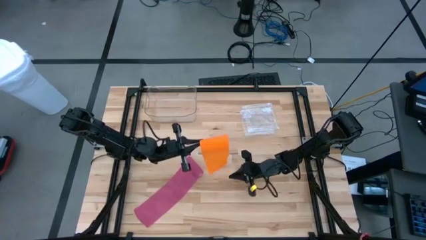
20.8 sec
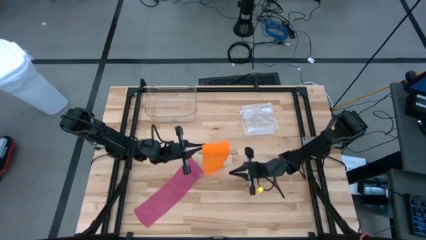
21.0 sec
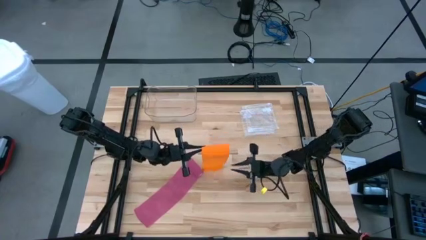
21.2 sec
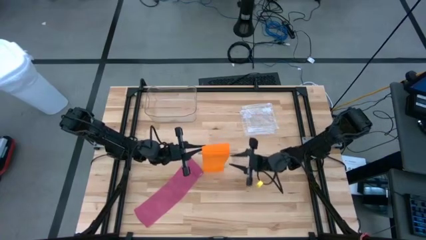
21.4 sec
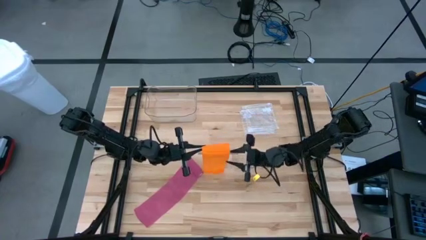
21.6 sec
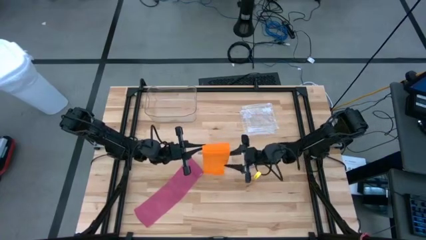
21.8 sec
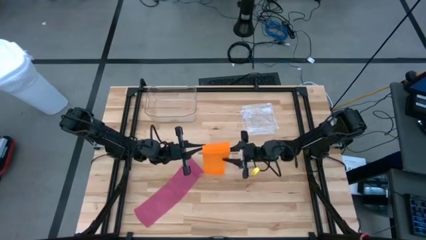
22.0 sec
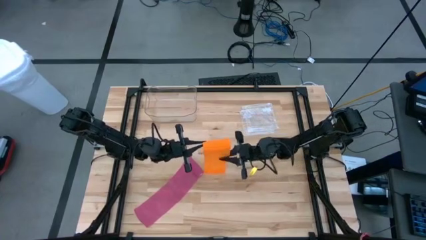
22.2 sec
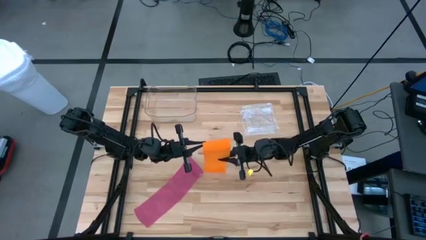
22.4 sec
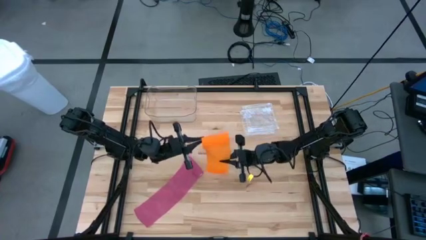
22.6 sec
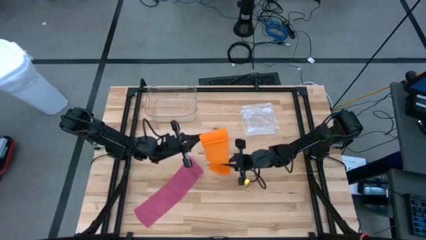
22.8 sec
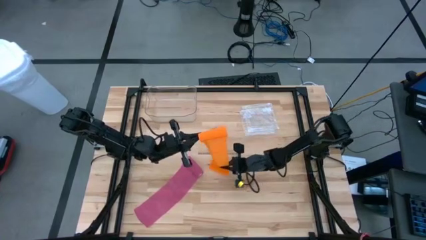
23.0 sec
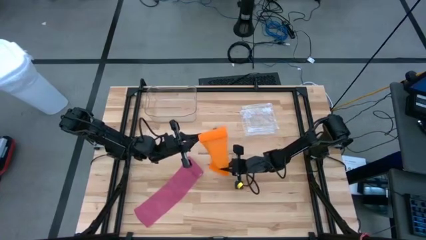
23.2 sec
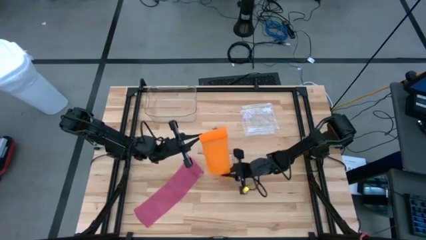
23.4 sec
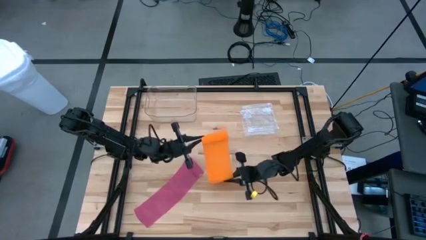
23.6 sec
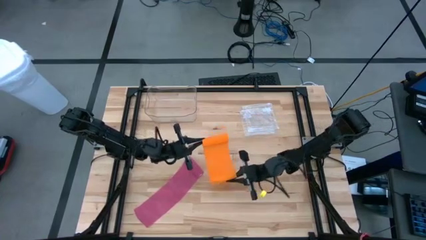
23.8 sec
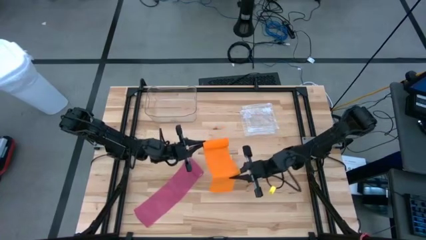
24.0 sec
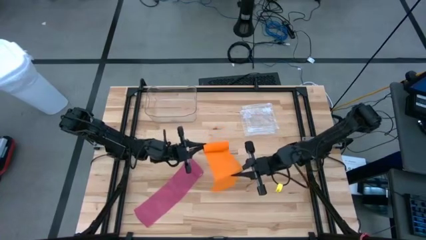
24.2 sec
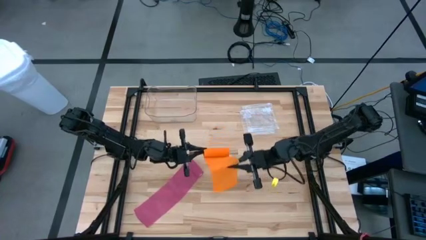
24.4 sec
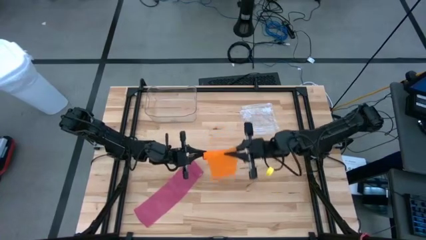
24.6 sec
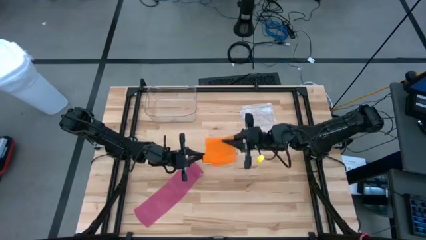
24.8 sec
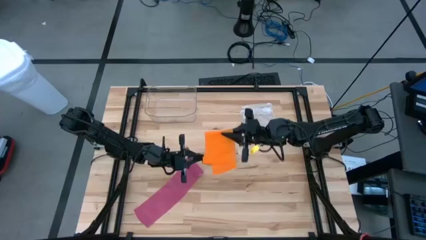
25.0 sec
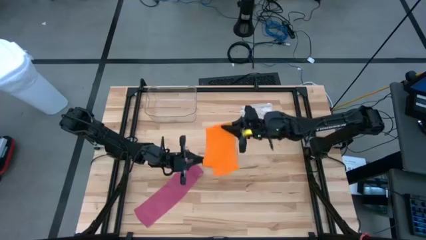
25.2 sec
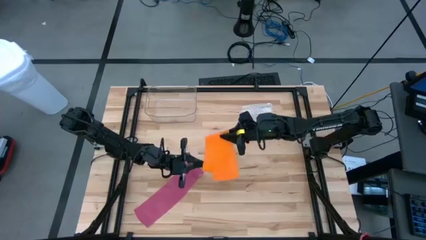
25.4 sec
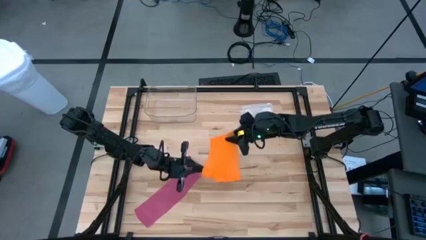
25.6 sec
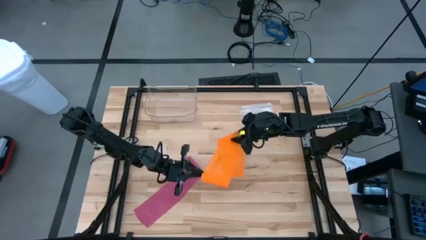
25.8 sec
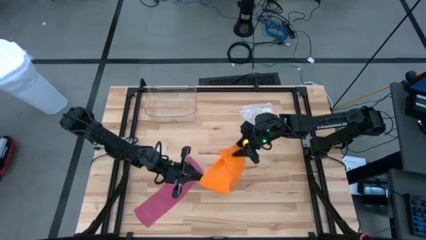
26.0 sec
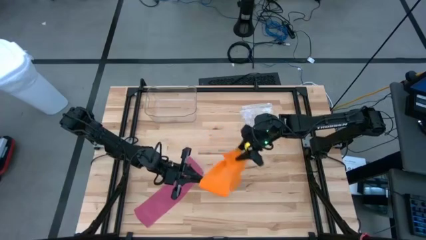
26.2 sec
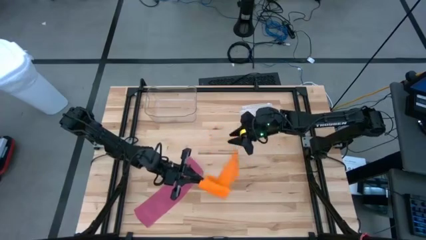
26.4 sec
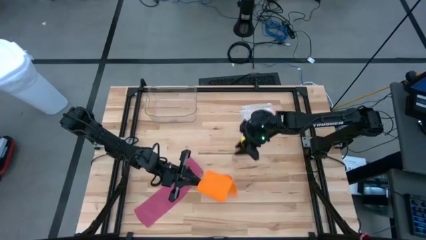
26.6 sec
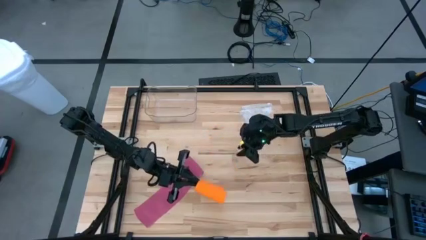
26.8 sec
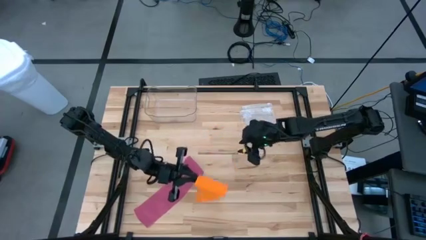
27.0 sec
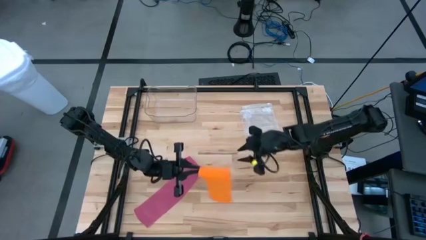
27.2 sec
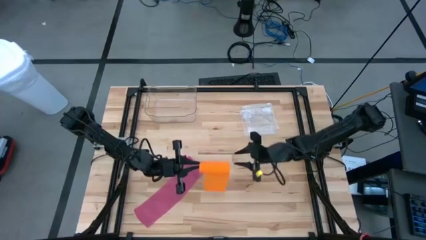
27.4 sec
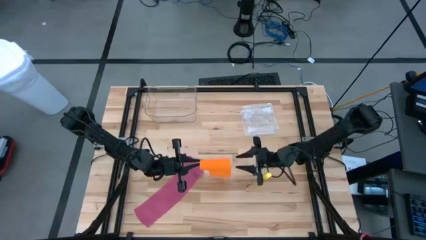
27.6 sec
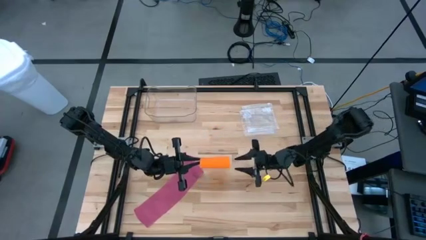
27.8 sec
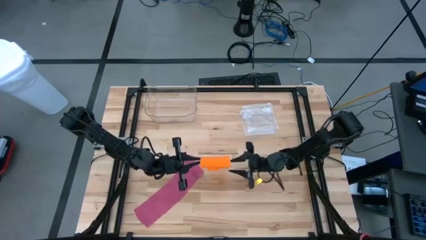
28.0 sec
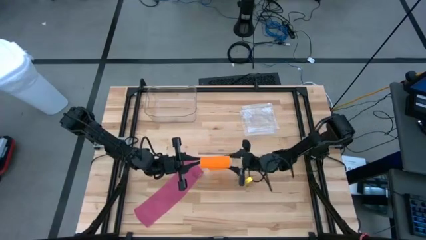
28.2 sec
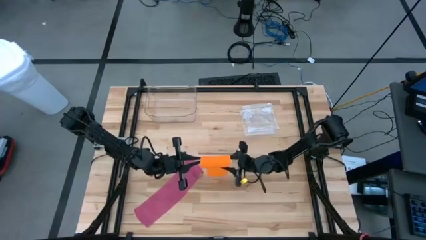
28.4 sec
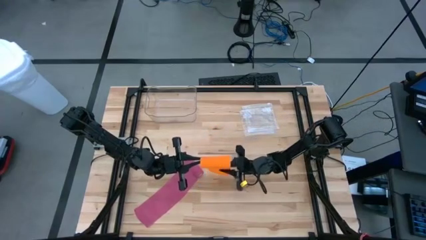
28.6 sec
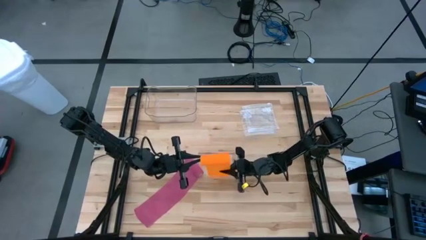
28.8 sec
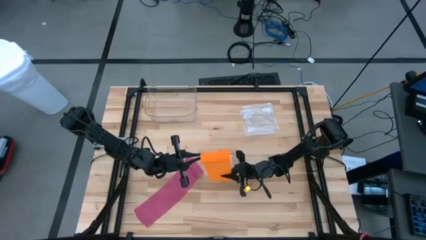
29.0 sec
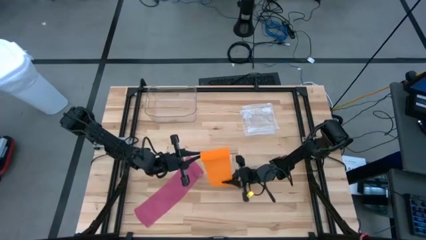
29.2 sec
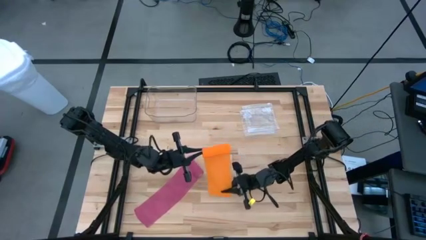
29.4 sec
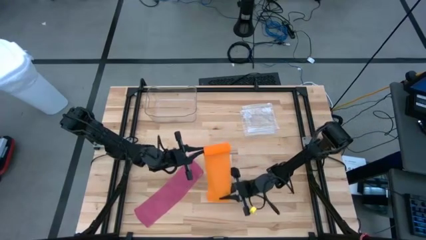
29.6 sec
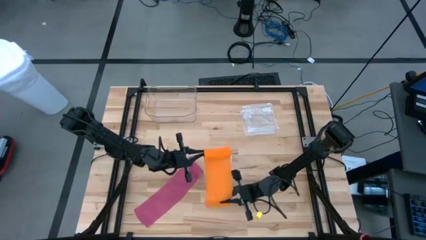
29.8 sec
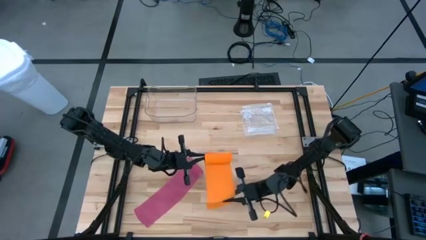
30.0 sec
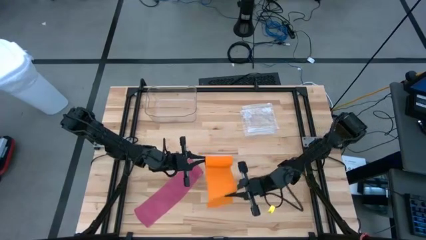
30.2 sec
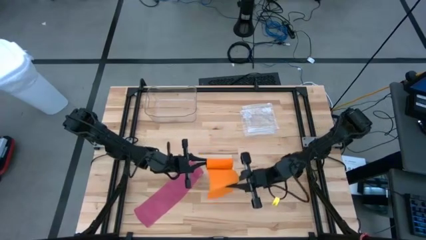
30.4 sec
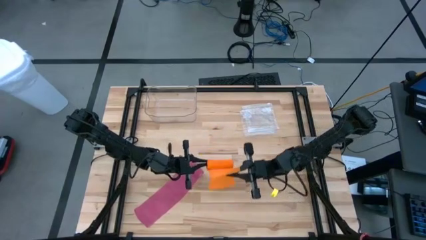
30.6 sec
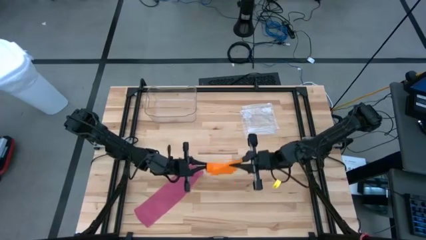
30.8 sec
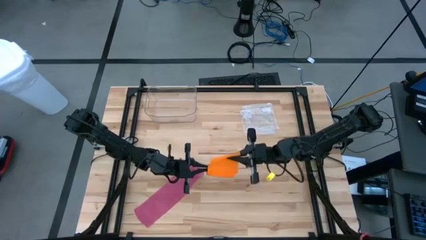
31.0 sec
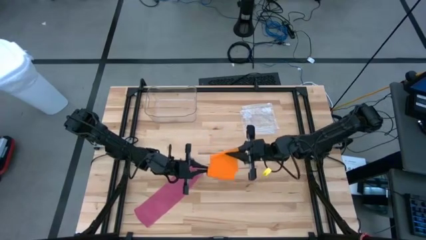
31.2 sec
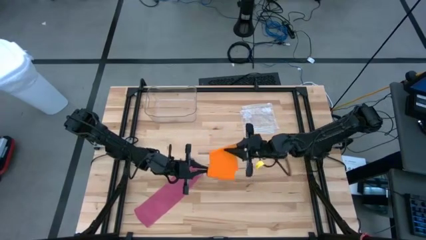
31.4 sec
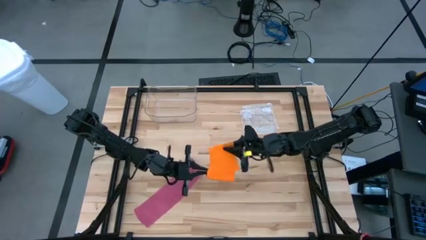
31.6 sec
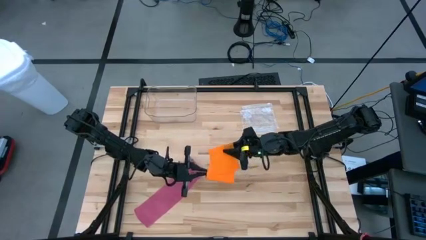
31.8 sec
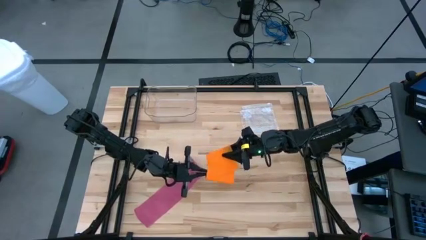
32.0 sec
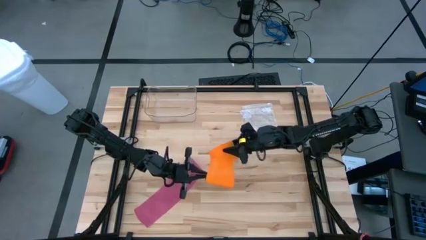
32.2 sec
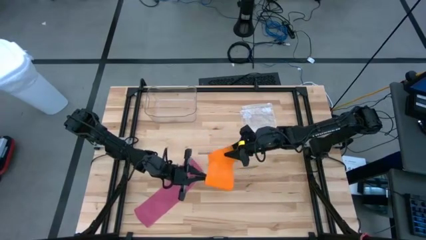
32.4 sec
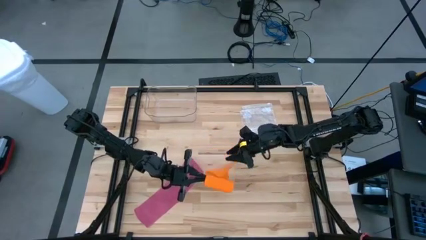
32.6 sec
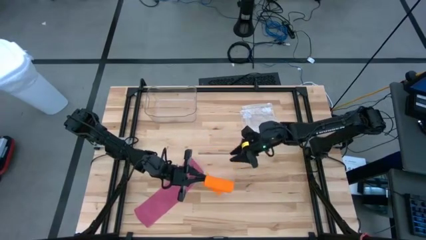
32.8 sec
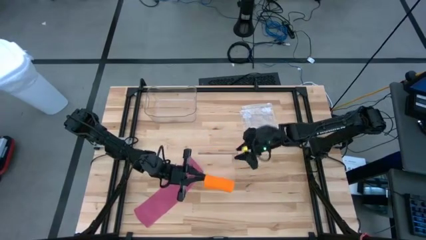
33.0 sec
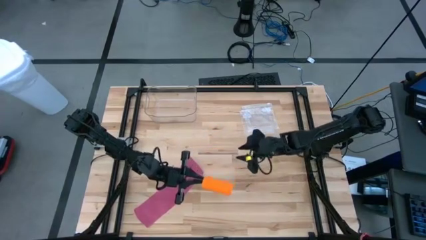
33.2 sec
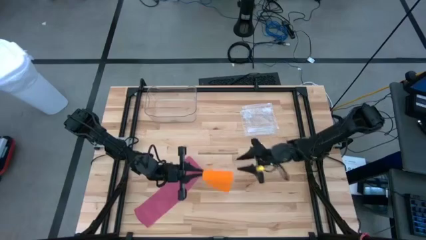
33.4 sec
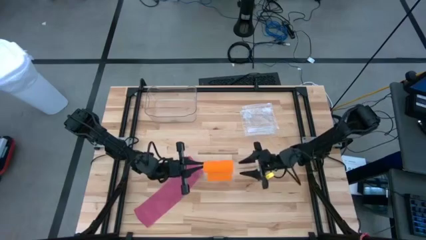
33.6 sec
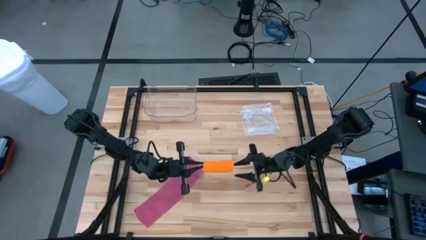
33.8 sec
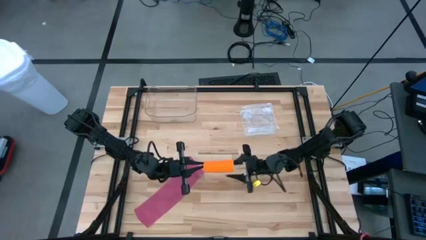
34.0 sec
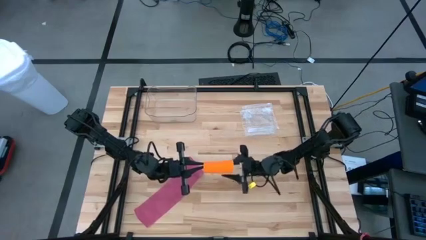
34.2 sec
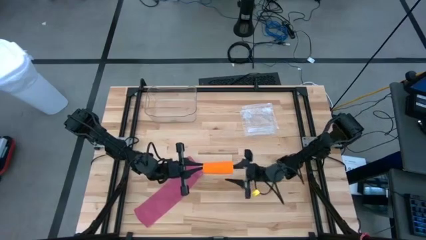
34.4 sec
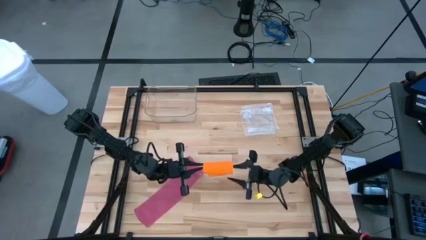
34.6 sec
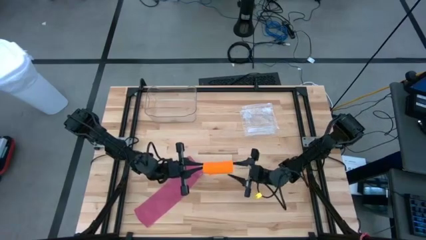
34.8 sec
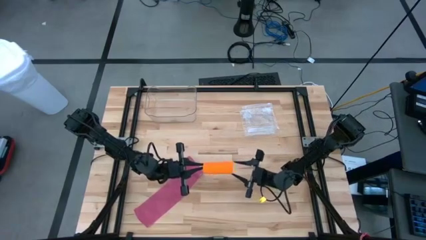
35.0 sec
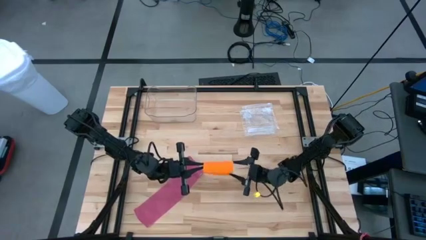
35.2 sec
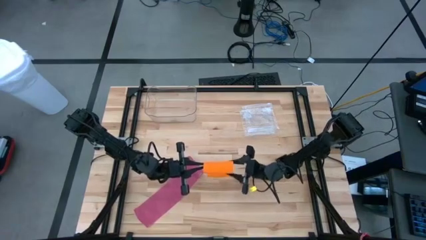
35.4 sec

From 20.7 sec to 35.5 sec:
Task: Roll bandage
Roll the orange bandage
